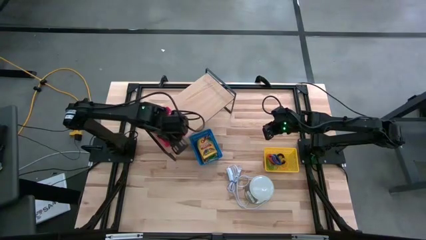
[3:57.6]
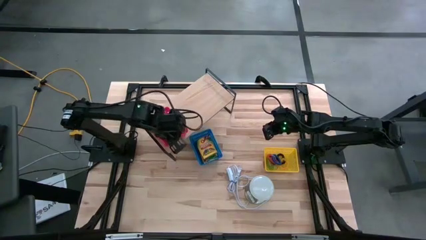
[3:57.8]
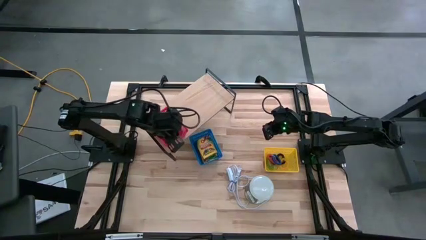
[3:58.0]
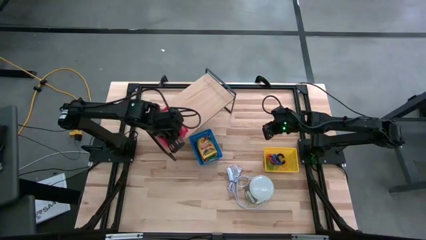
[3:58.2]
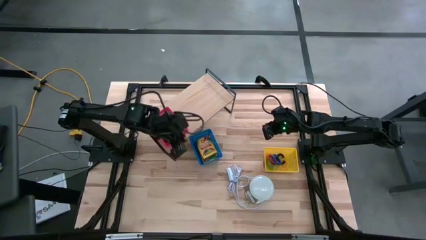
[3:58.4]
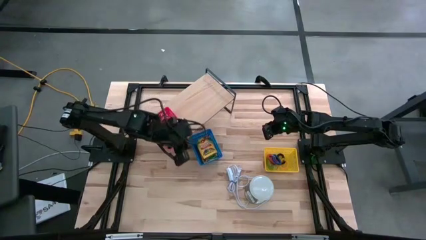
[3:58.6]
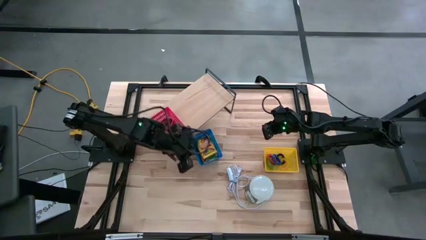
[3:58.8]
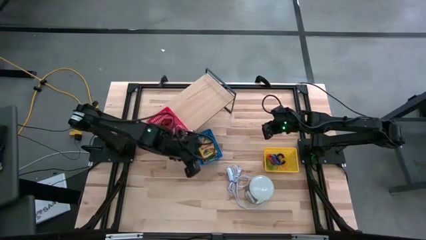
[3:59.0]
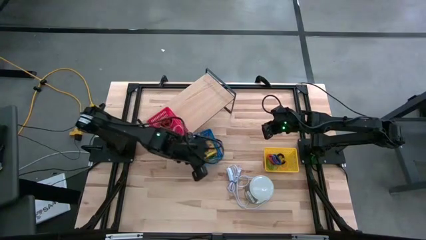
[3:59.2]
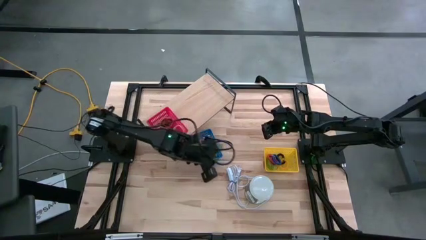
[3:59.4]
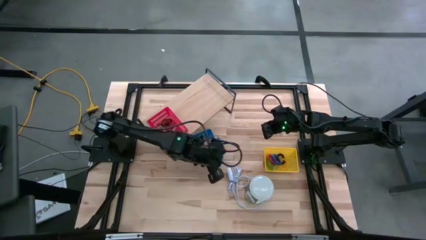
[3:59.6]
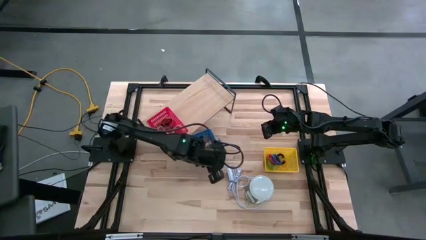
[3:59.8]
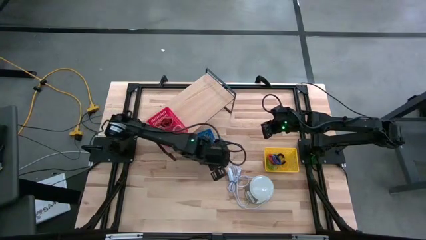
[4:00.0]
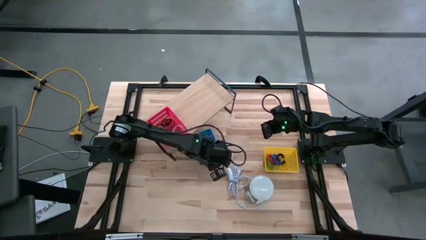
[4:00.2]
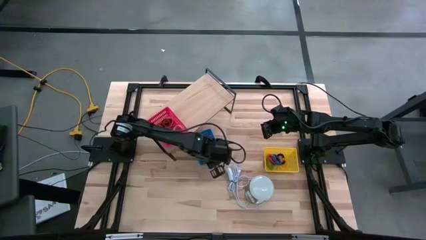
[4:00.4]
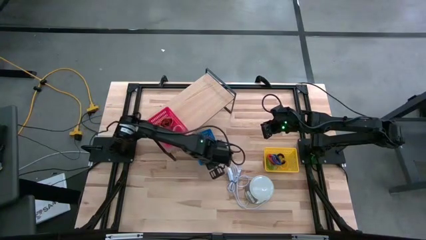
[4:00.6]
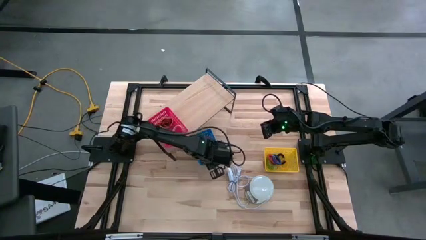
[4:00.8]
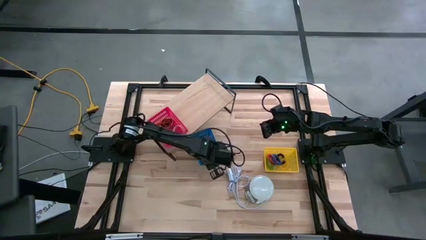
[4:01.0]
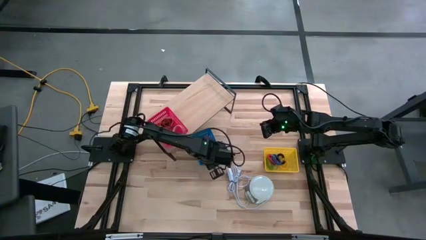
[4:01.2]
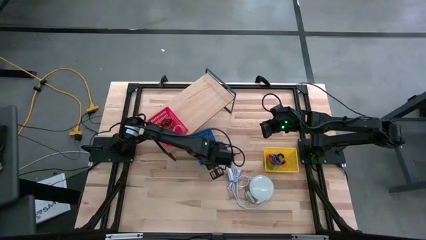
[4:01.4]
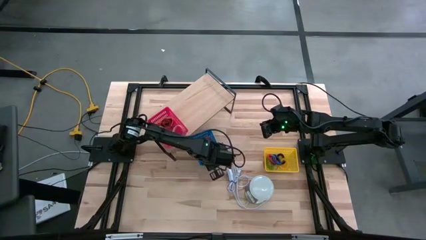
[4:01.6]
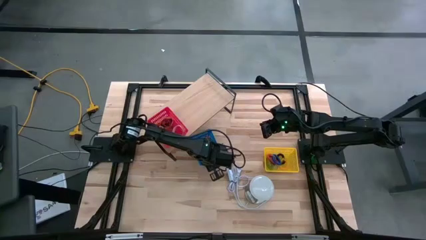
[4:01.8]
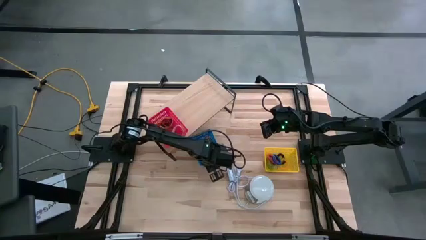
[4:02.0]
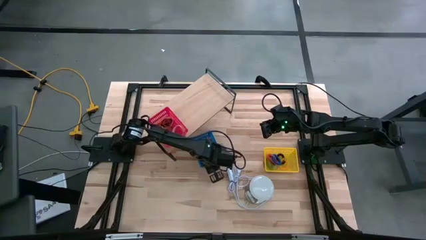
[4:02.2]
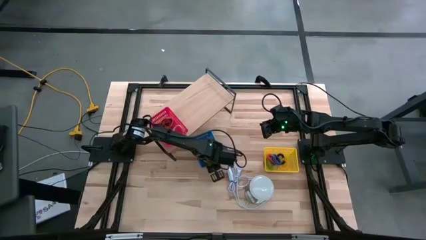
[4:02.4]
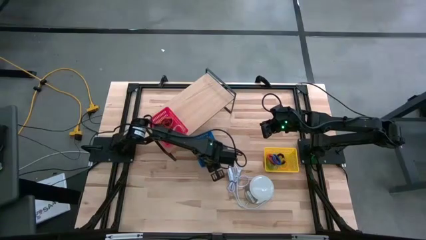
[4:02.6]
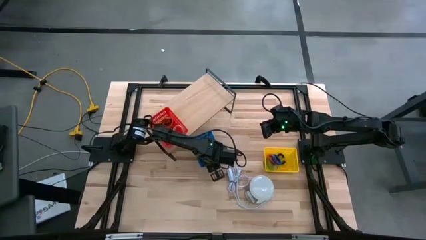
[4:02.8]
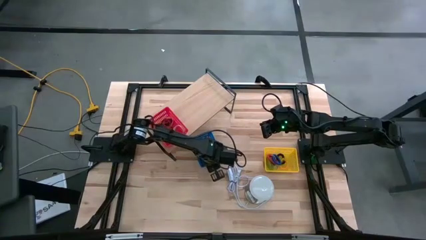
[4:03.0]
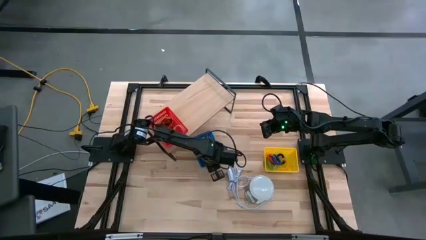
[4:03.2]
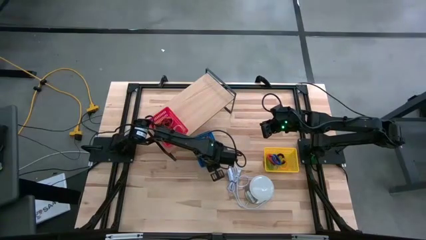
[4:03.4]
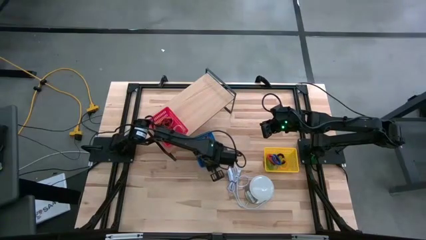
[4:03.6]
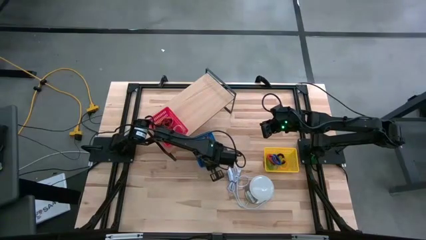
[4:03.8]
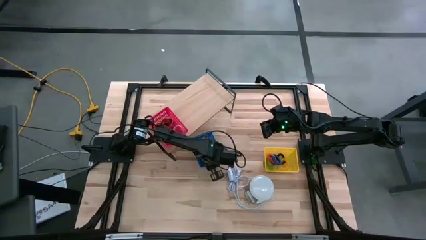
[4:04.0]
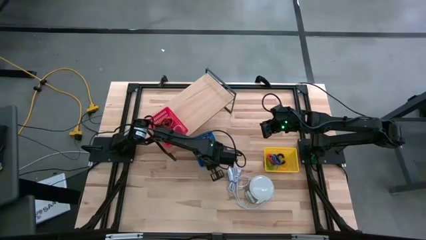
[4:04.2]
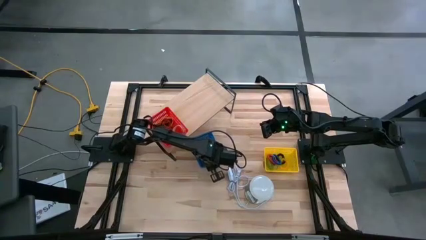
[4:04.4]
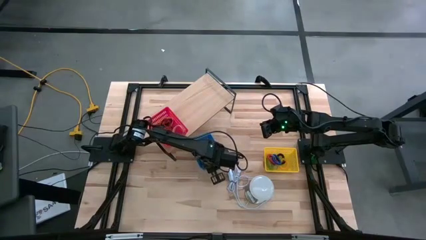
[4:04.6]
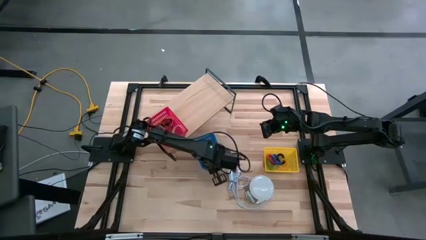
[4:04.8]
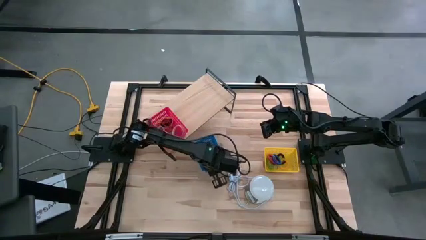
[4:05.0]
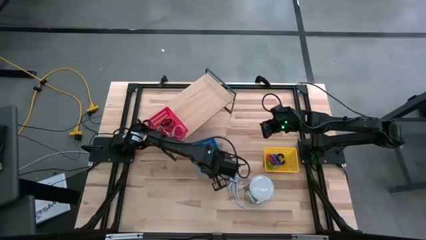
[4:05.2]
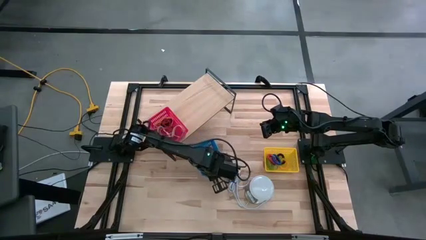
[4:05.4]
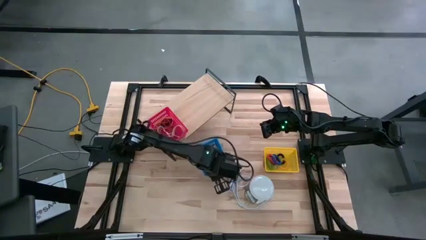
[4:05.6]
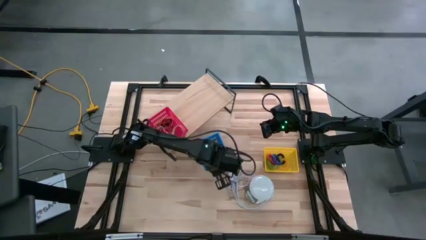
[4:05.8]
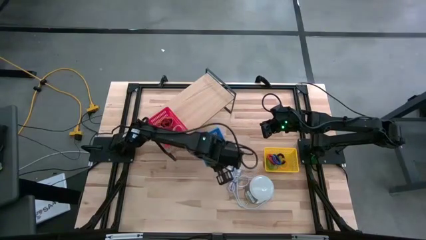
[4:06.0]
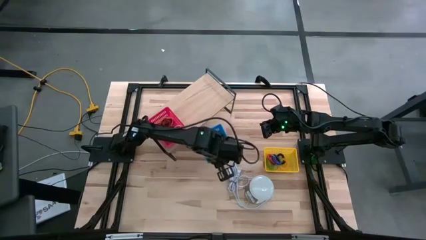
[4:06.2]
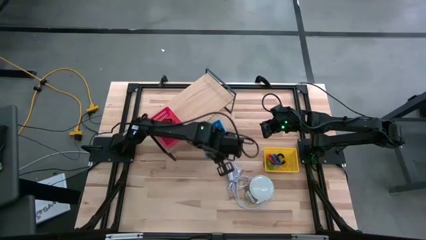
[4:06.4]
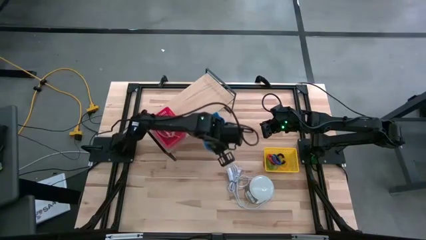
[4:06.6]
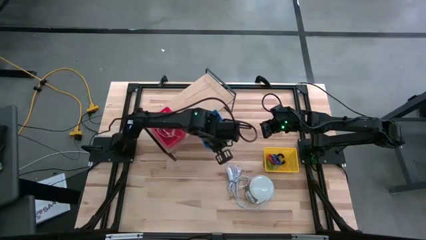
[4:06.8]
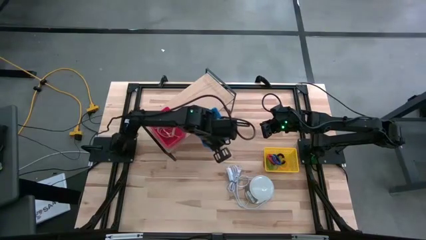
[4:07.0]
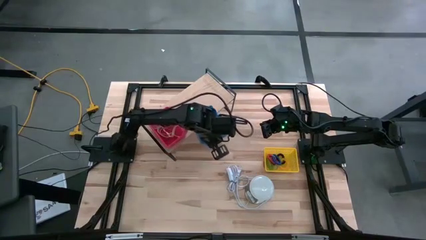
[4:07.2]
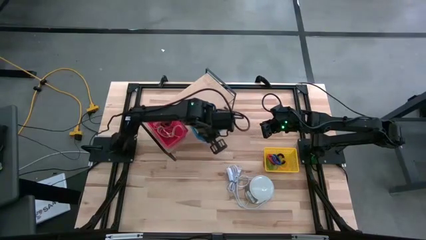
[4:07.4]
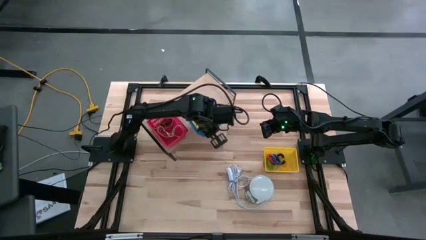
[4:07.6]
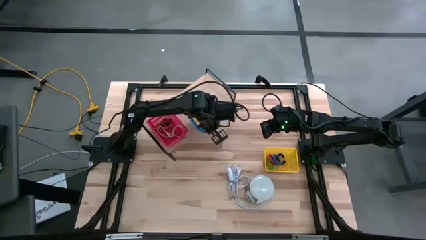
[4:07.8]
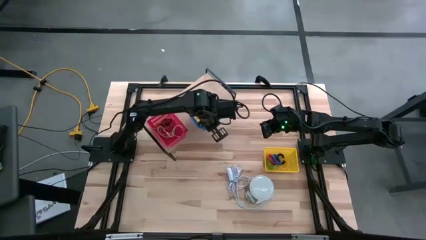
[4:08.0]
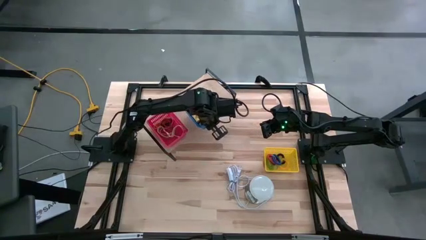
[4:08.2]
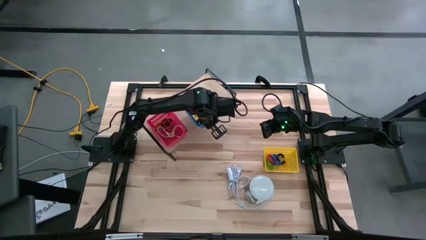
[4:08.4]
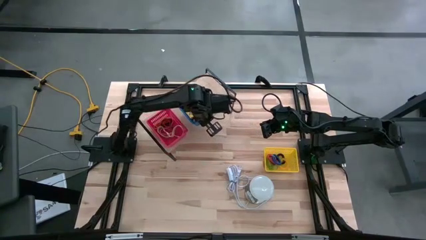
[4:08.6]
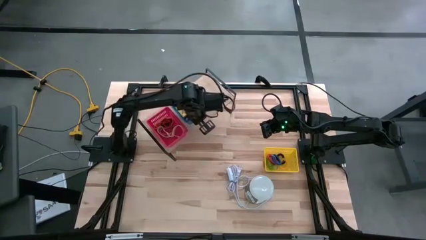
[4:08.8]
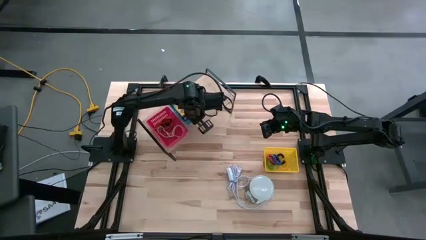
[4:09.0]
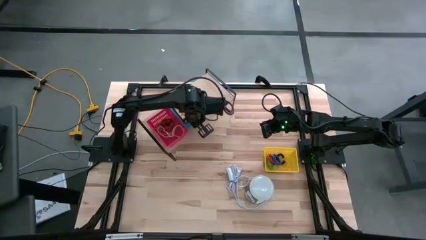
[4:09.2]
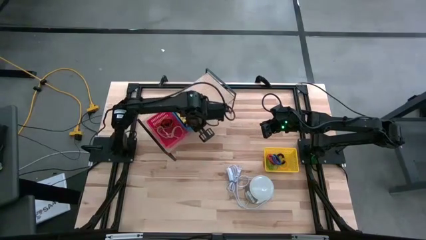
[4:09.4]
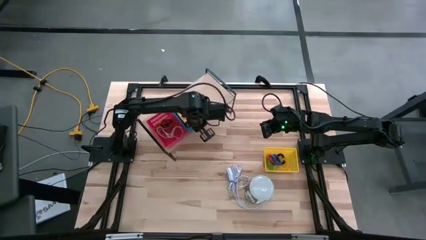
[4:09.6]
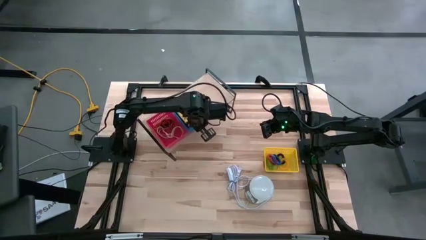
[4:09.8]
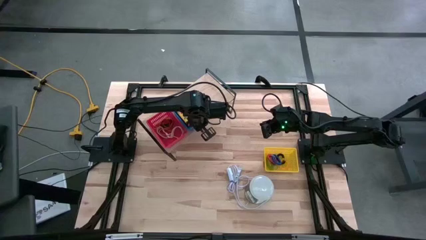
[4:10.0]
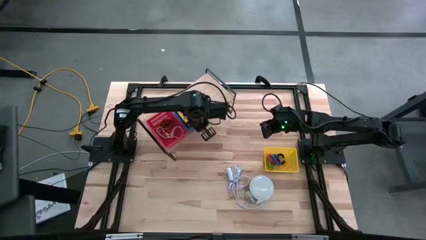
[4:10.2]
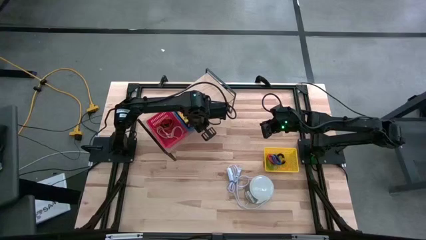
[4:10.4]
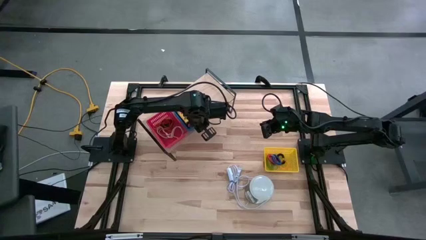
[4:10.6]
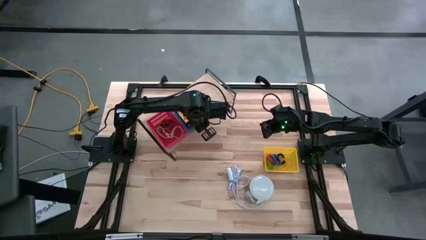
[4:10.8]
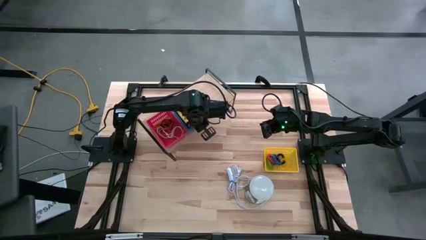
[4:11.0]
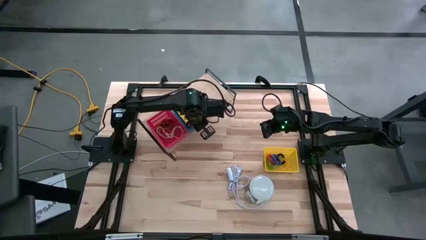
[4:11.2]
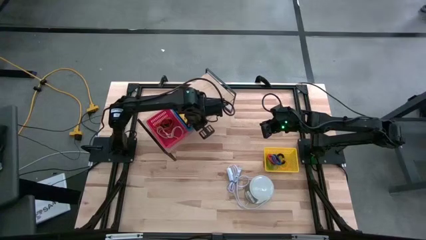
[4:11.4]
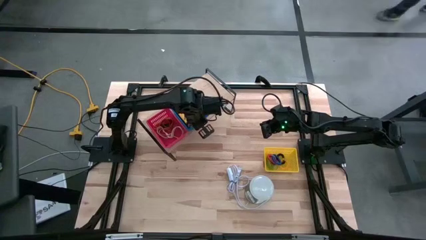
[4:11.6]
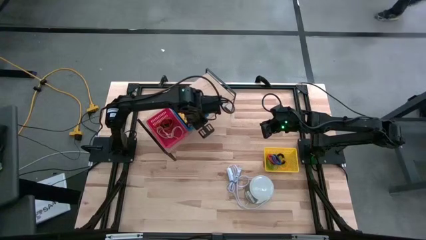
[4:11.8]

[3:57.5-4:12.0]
Task: Pick & Place Office Desk Supplies
Put the blue bin with the pack of crayons on the shelf

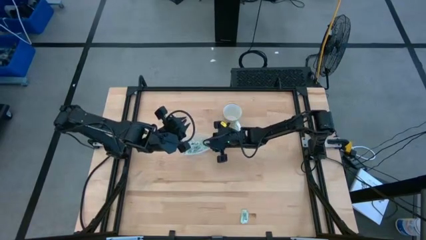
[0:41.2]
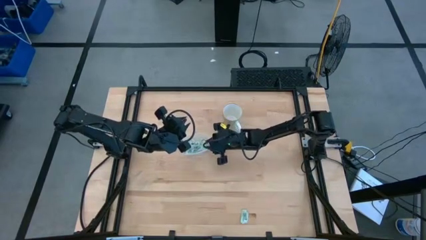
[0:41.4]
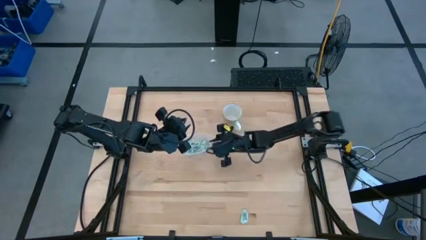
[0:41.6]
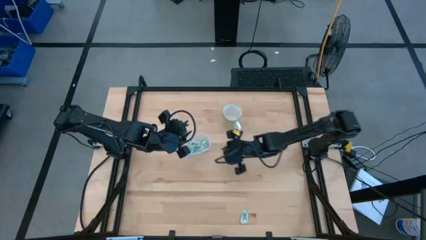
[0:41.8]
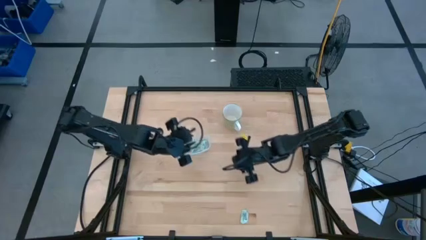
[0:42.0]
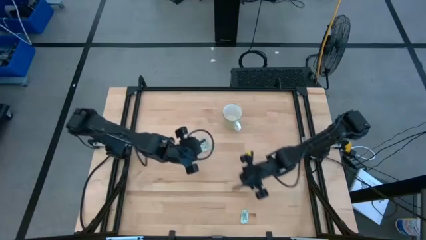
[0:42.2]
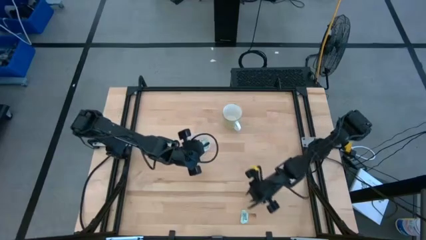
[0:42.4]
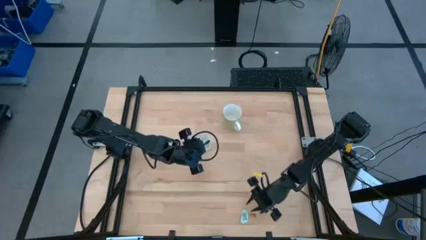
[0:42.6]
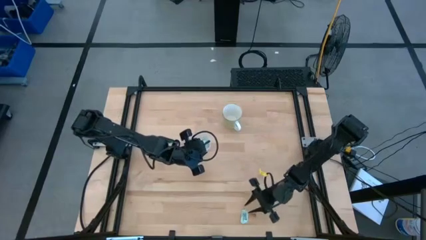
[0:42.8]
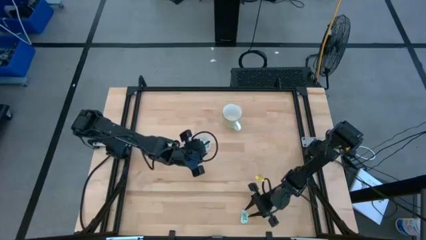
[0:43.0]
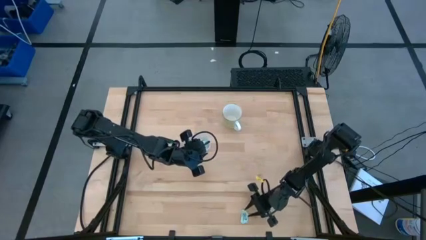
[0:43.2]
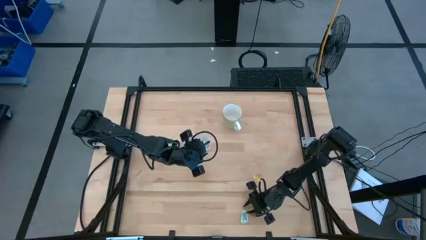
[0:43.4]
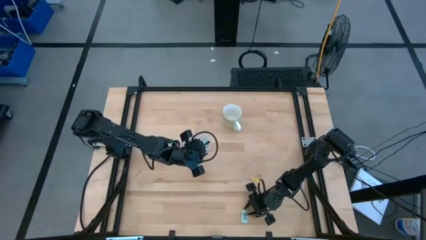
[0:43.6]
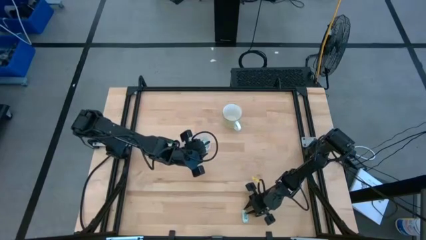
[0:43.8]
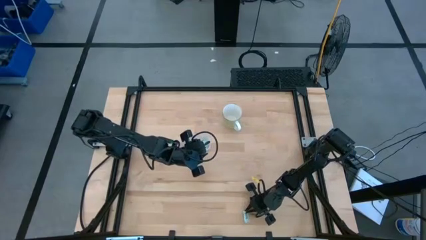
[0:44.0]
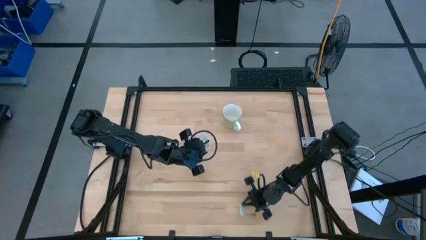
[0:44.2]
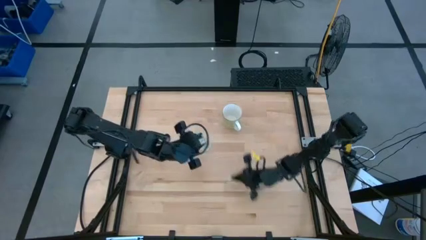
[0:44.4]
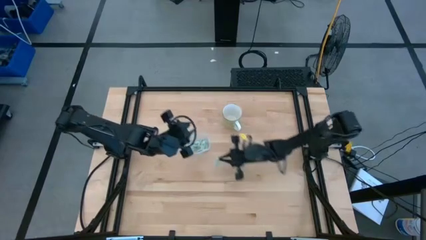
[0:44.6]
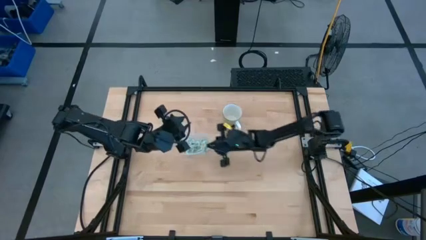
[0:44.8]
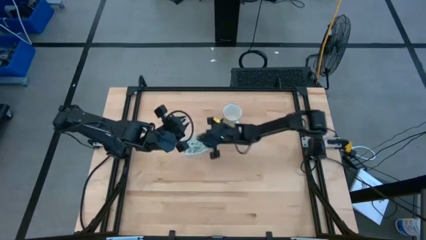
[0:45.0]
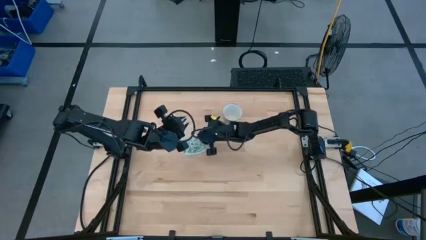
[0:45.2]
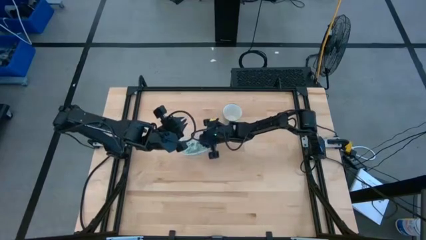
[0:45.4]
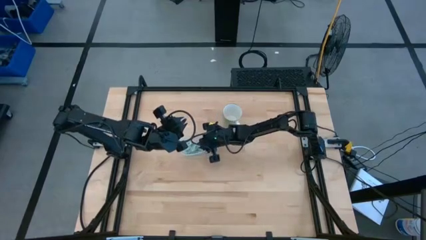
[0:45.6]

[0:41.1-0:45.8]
Task: Pick and place Stevia / Truvia into bins
Put the white stevia packet into the bin
